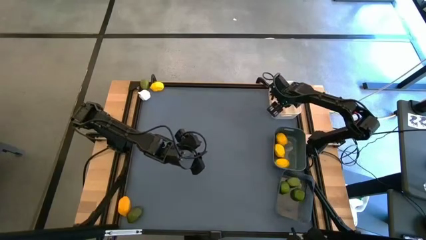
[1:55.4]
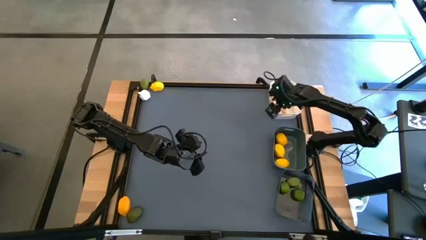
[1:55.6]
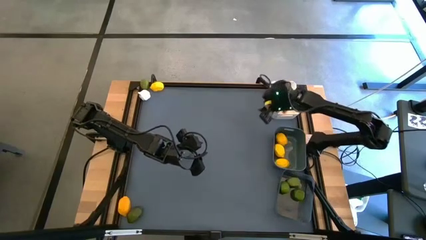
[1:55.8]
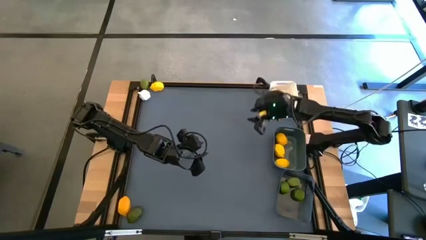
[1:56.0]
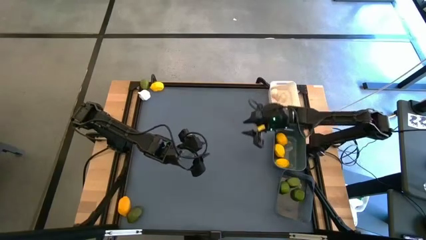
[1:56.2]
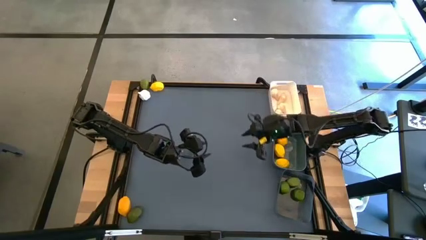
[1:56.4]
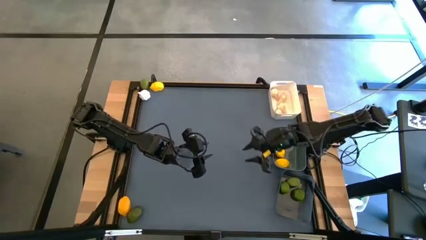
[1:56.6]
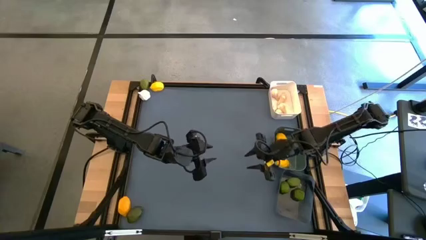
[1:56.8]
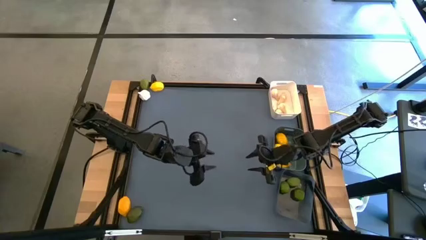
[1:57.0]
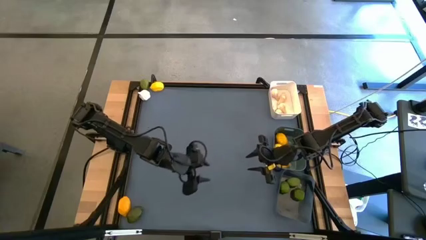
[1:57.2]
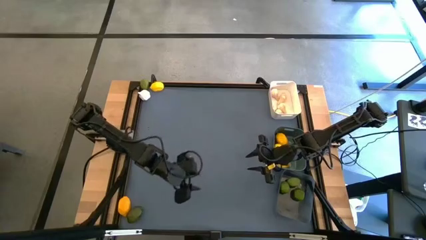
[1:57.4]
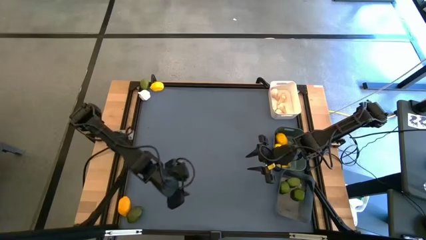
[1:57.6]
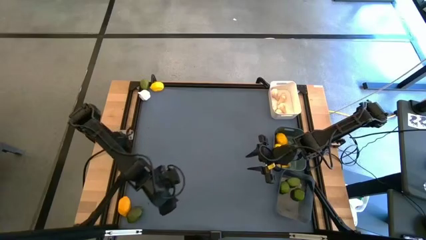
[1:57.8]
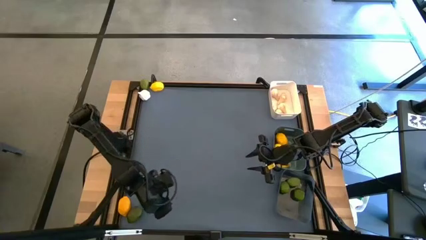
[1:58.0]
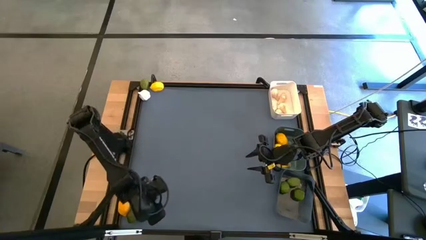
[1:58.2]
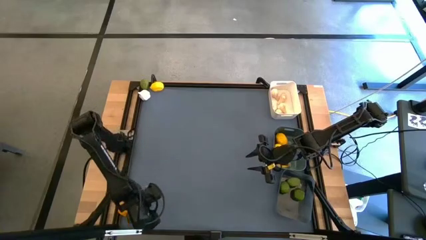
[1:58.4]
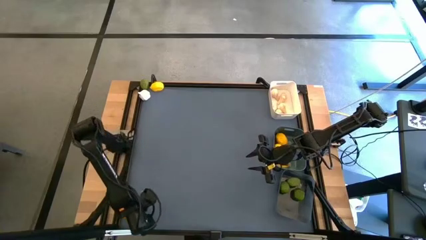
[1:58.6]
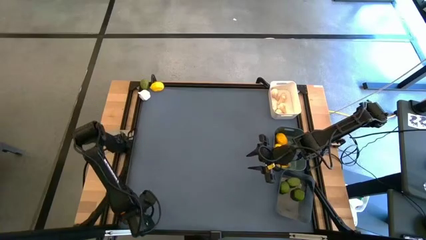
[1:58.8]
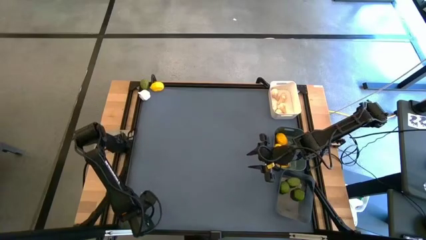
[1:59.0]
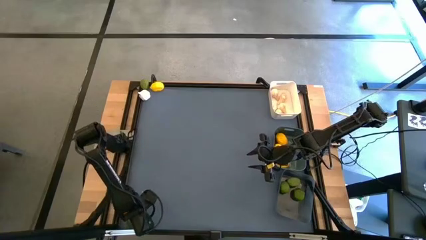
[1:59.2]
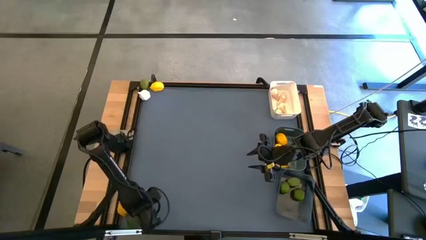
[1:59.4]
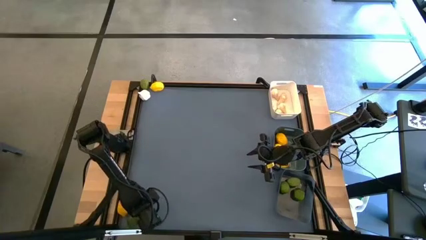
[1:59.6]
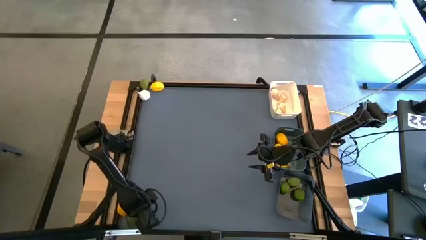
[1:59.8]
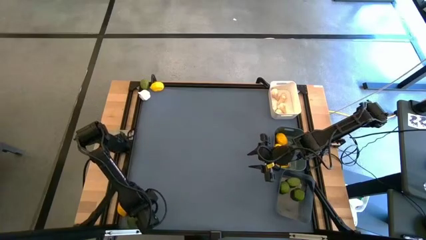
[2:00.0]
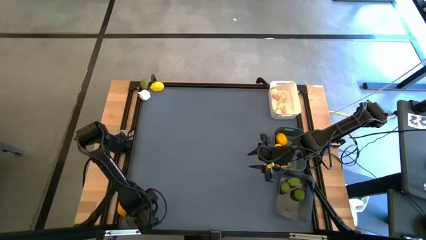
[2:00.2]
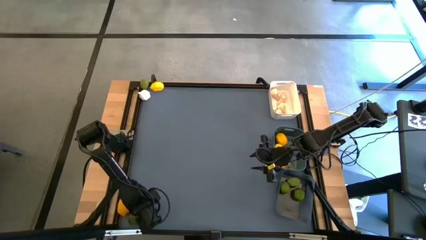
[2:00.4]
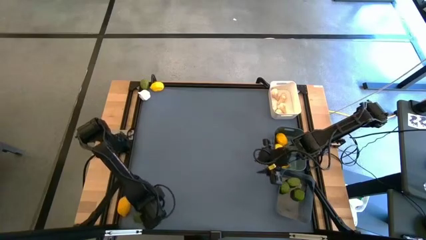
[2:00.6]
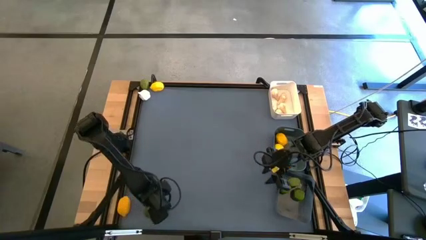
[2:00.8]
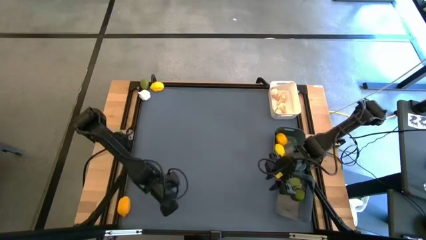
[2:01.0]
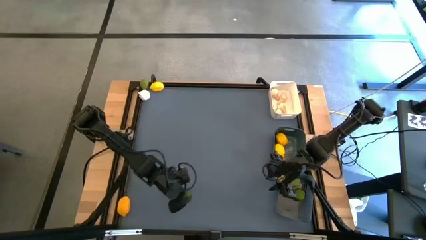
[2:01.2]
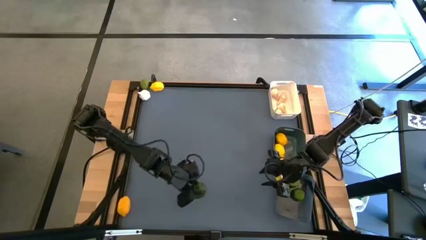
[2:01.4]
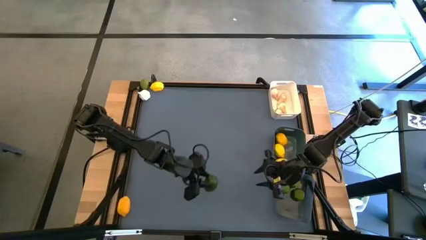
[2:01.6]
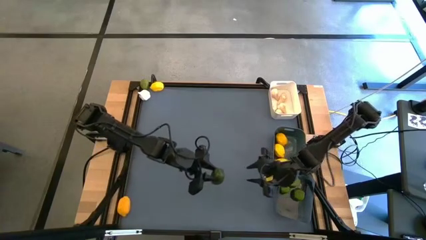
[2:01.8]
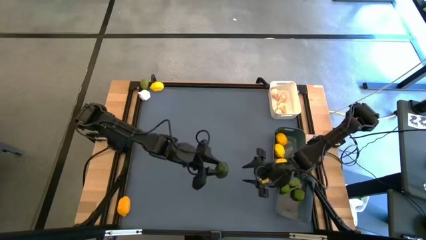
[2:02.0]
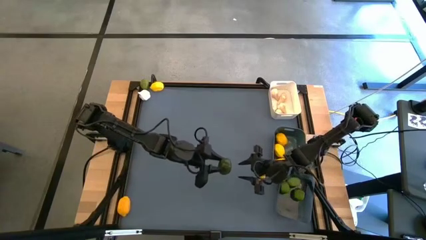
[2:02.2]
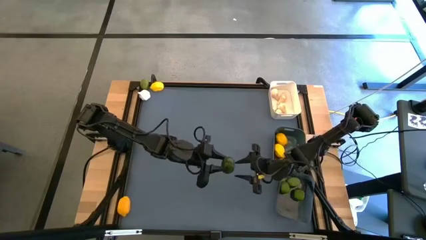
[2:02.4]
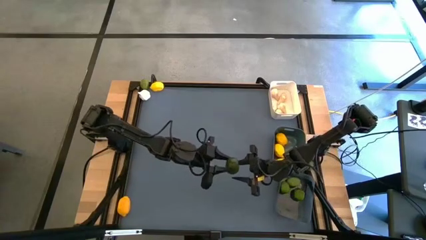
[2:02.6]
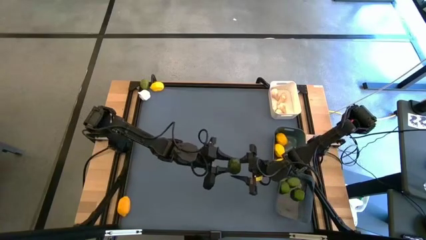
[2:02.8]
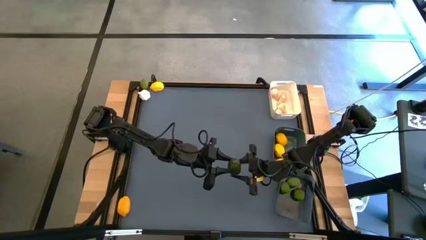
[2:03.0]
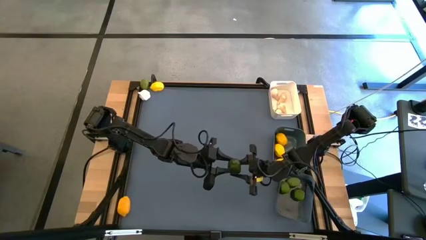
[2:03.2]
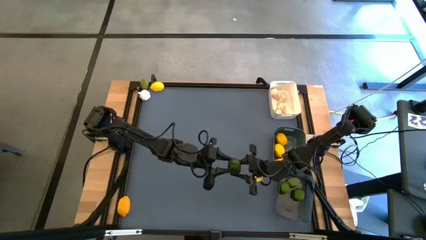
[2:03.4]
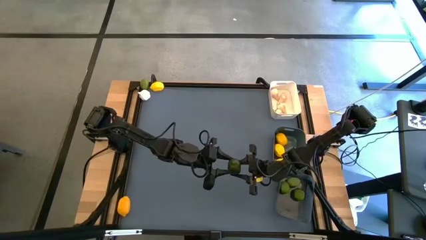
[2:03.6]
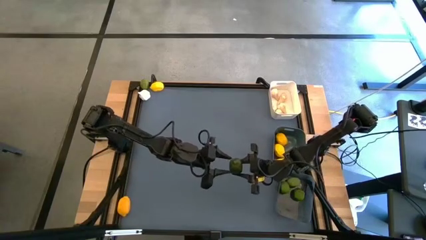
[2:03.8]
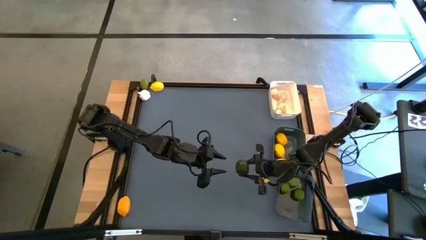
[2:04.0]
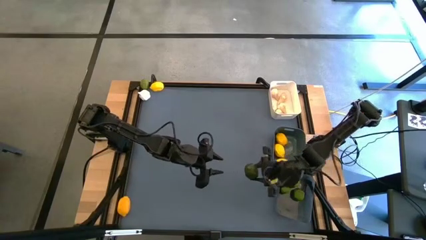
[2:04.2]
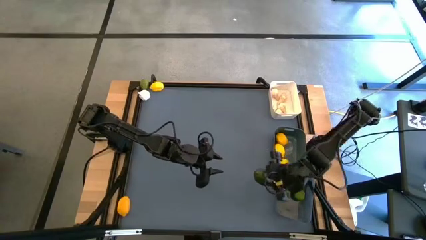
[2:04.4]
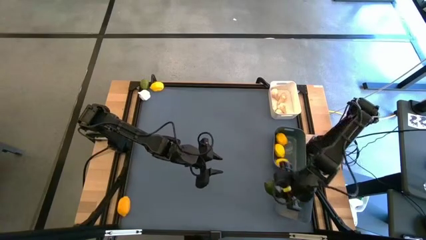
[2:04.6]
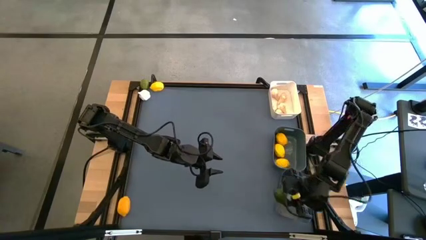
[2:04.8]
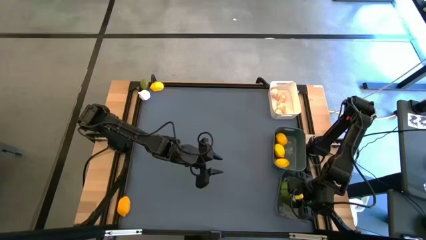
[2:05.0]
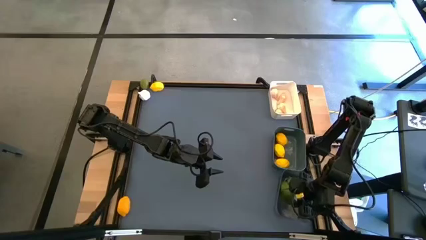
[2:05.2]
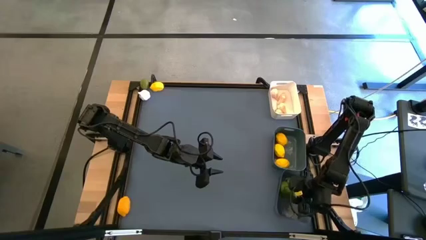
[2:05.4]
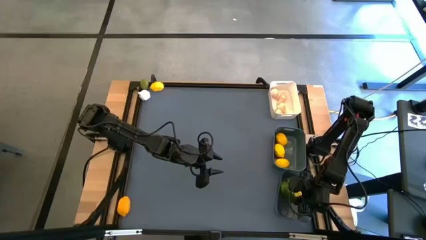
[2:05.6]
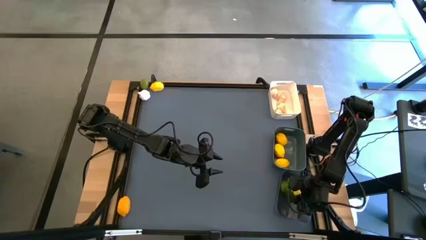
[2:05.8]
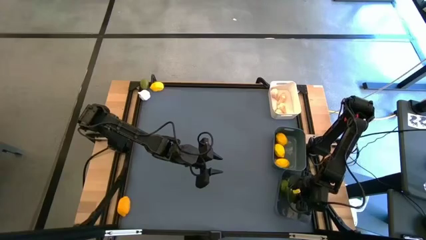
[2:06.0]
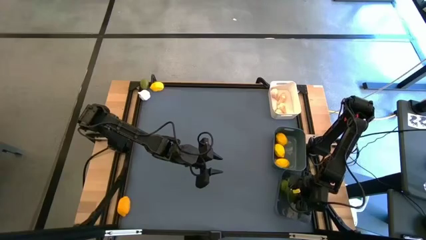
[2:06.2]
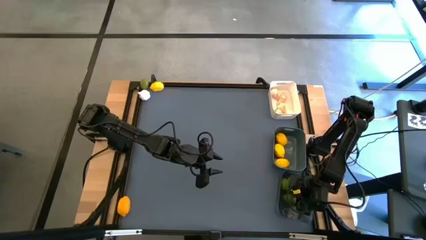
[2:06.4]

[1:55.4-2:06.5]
Task: Sort produce into baskets
Put the green lime into the black bin

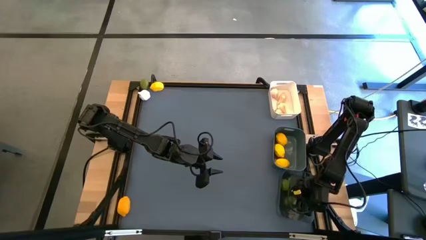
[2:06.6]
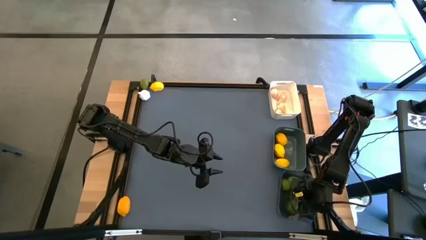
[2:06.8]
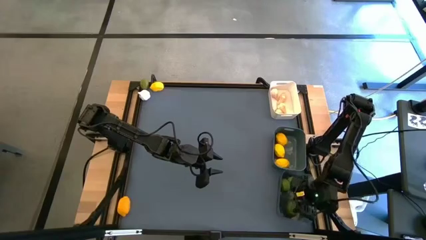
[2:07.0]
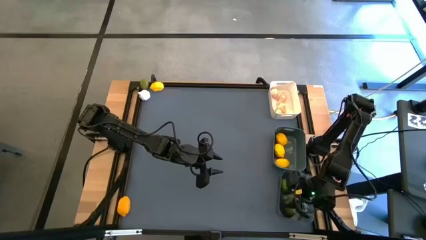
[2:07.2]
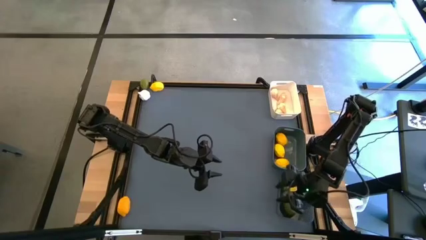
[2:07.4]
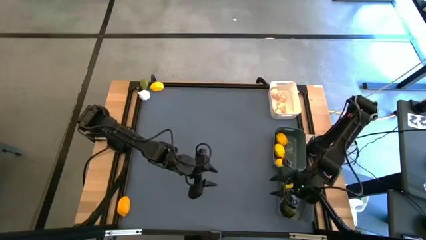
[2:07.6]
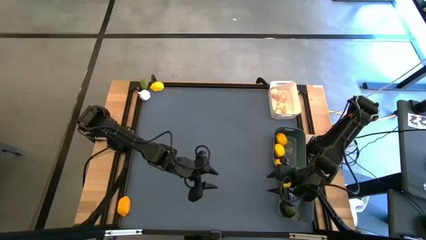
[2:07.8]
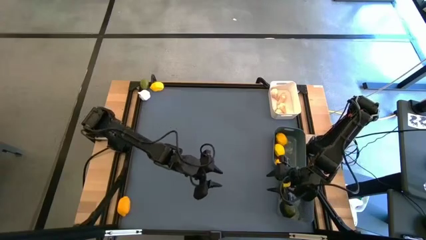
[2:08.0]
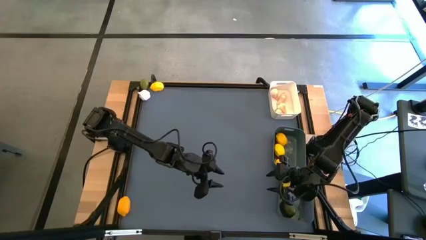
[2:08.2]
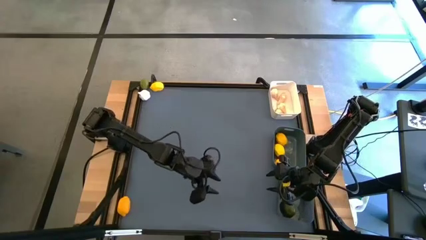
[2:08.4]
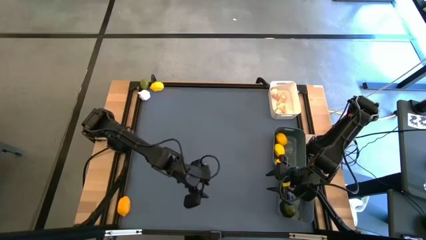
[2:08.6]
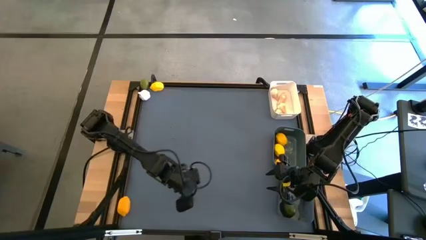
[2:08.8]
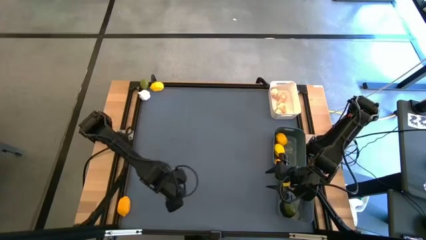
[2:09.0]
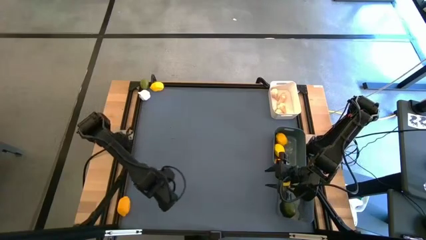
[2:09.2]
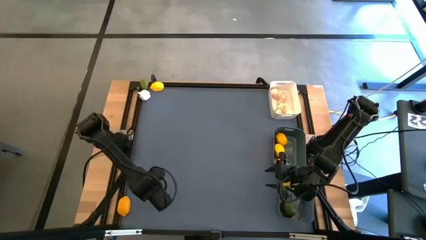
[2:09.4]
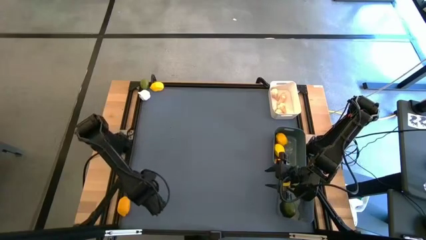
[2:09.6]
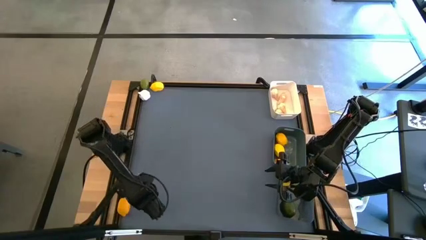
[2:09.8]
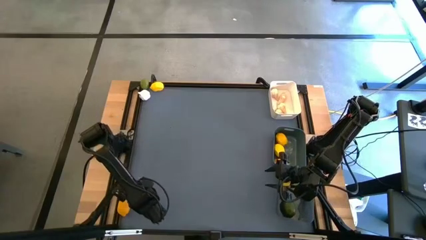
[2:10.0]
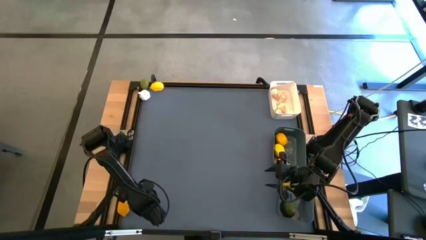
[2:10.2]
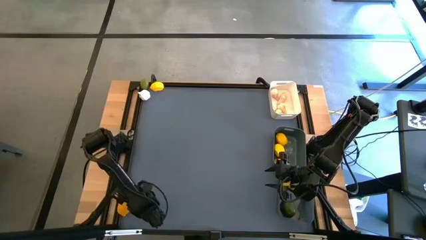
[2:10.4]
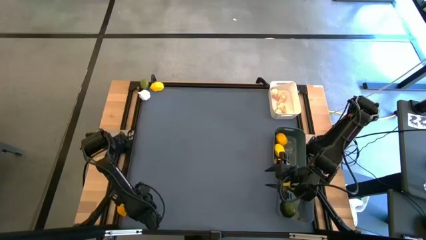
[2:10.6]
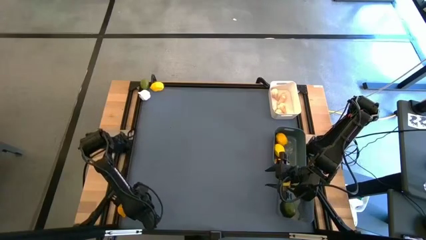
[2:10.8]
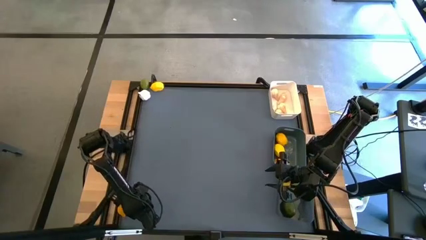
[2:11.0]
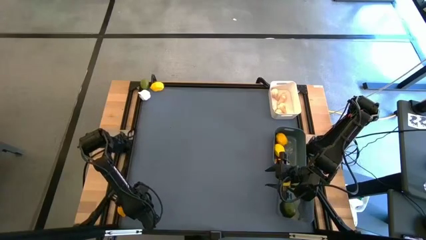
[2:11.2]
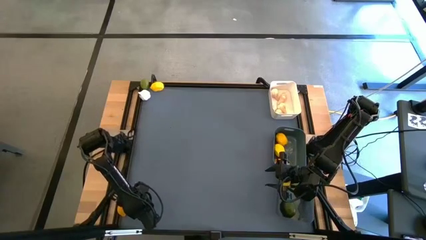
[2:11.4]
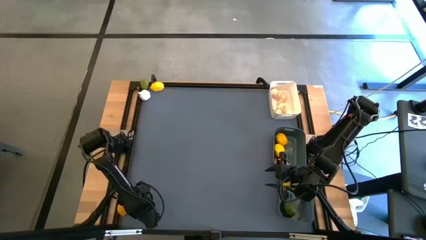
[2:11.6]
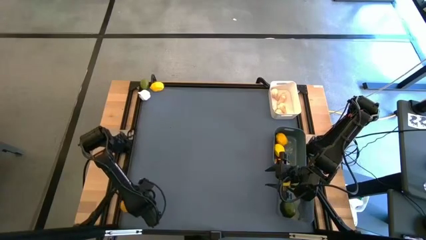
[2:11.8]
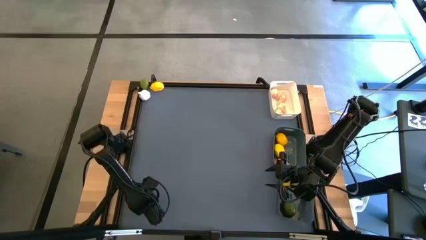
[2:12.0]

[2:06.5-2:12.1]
Put the yellow lemon into the gray bin
